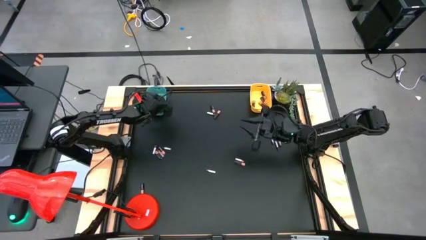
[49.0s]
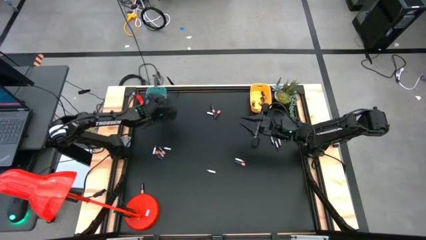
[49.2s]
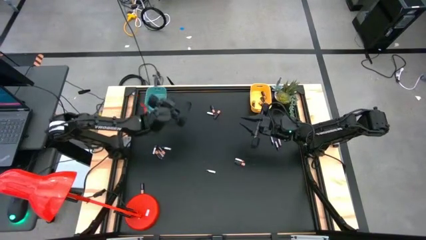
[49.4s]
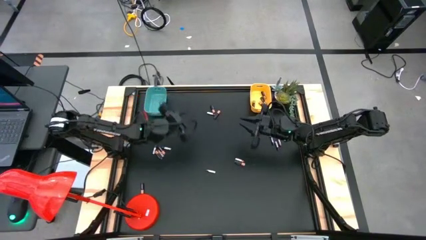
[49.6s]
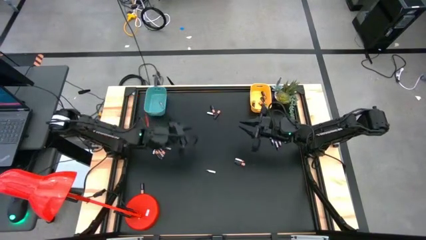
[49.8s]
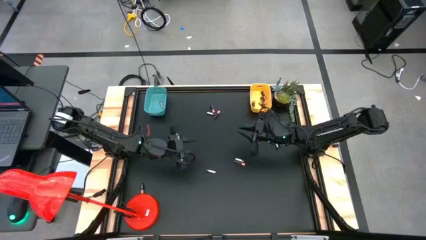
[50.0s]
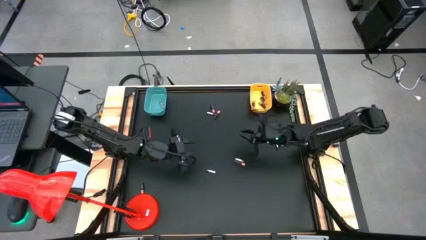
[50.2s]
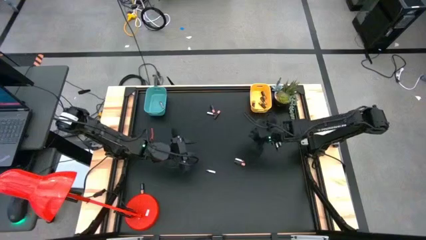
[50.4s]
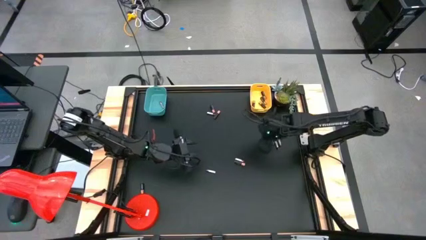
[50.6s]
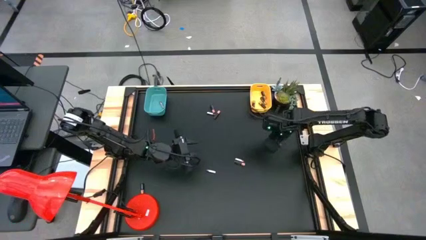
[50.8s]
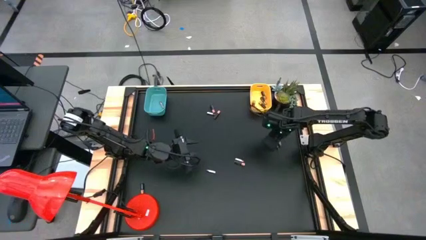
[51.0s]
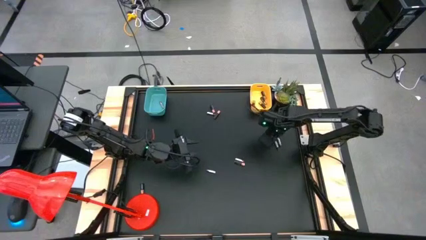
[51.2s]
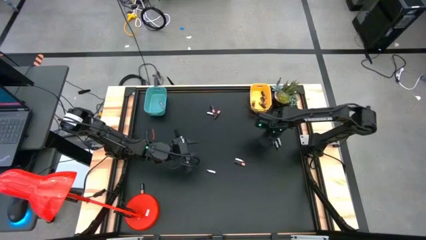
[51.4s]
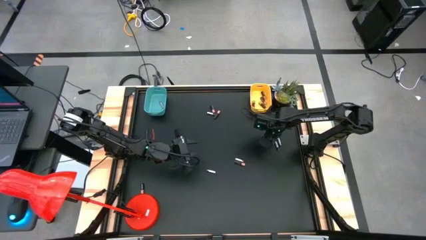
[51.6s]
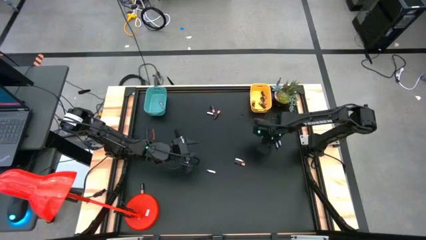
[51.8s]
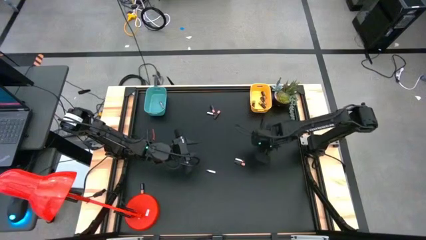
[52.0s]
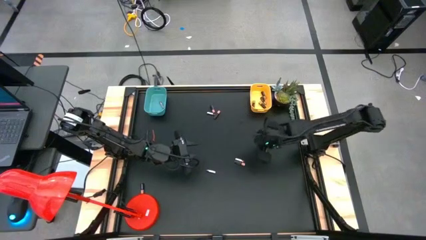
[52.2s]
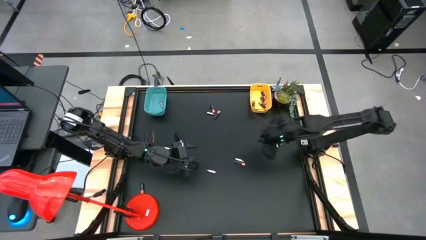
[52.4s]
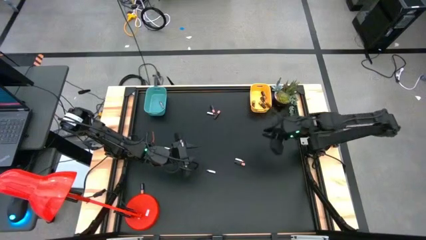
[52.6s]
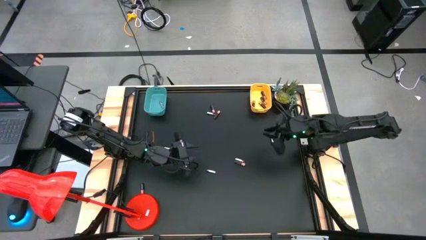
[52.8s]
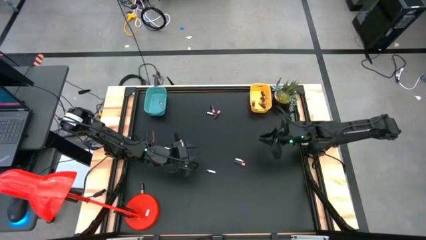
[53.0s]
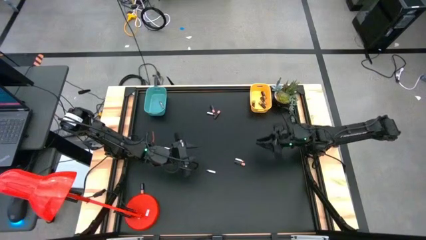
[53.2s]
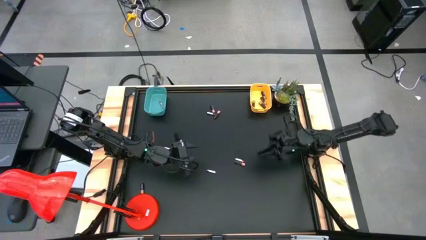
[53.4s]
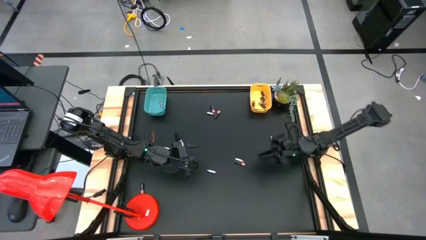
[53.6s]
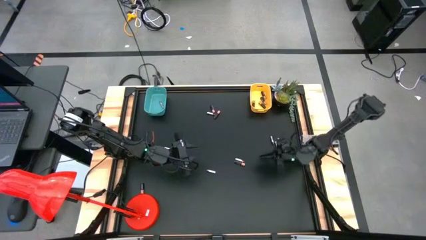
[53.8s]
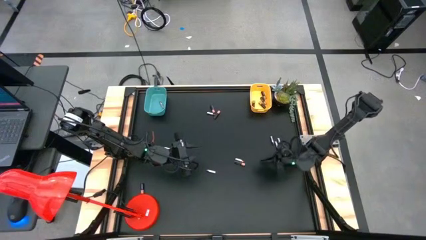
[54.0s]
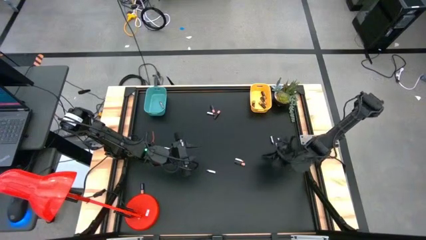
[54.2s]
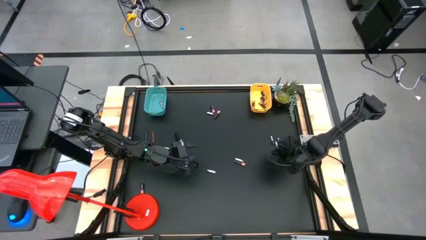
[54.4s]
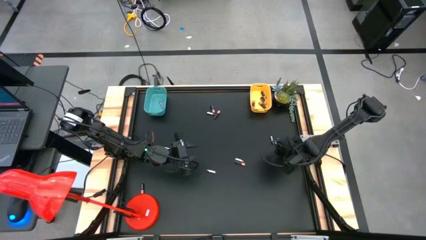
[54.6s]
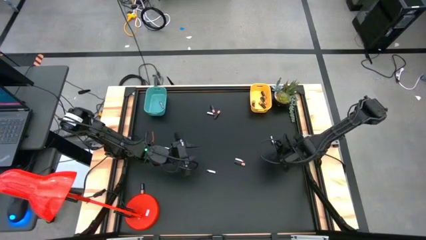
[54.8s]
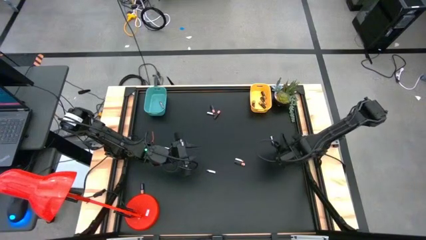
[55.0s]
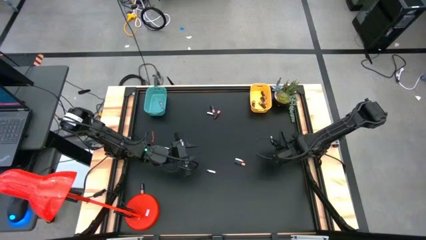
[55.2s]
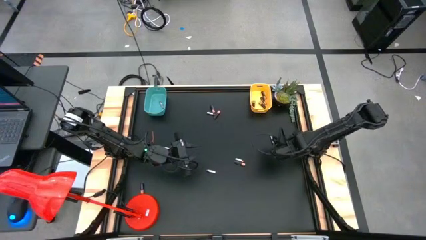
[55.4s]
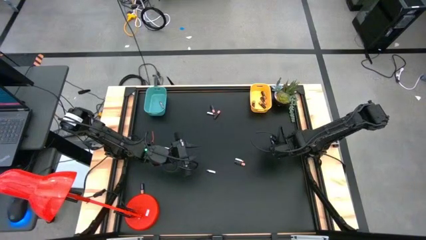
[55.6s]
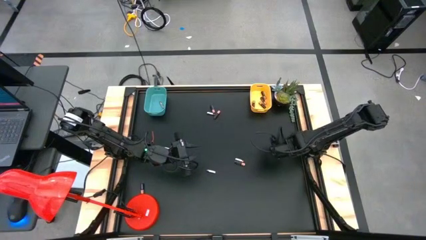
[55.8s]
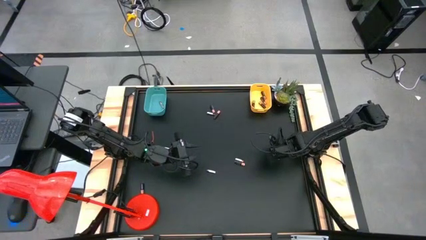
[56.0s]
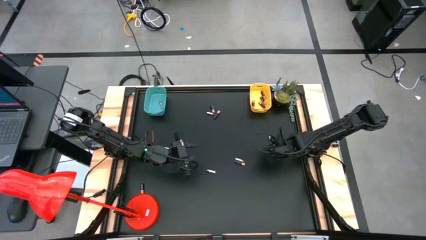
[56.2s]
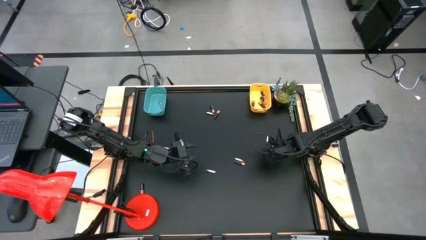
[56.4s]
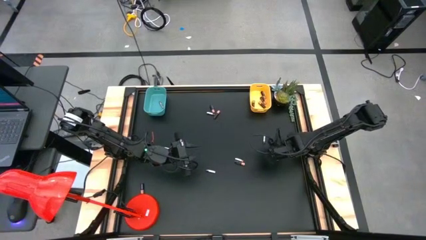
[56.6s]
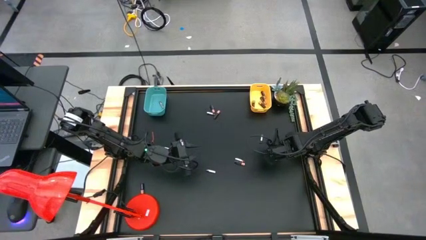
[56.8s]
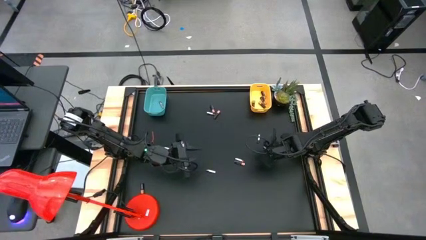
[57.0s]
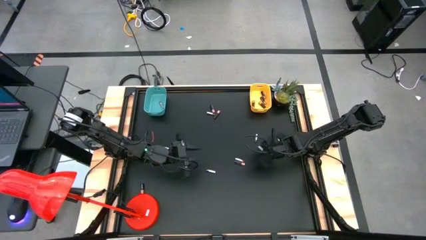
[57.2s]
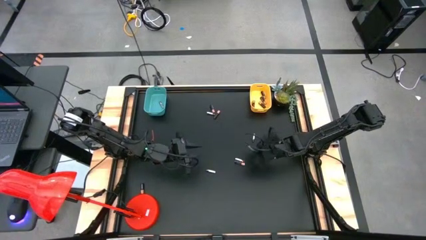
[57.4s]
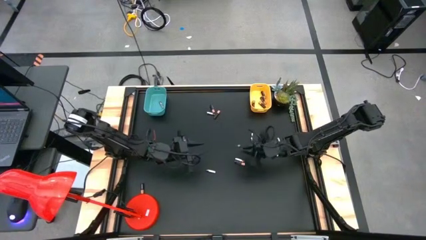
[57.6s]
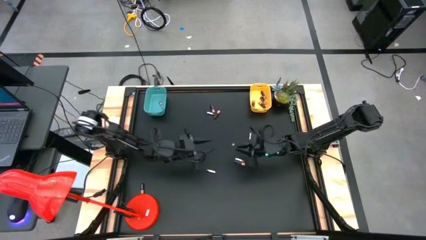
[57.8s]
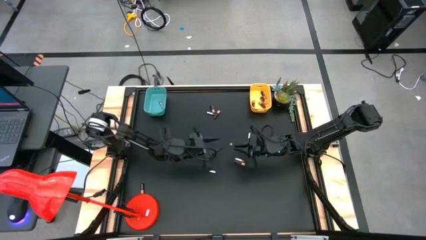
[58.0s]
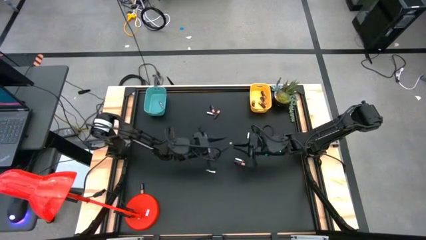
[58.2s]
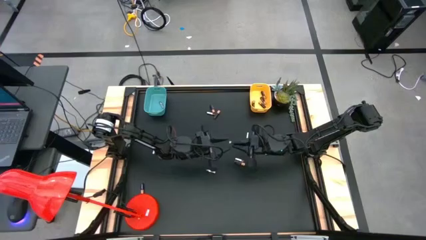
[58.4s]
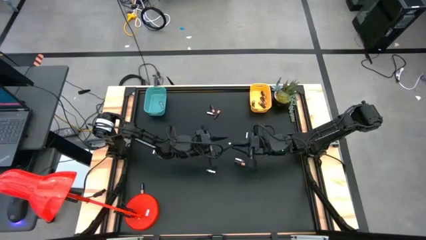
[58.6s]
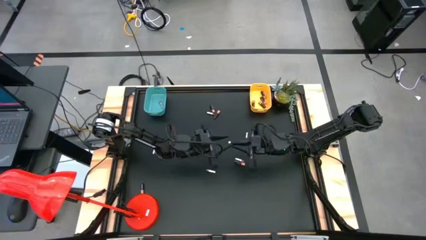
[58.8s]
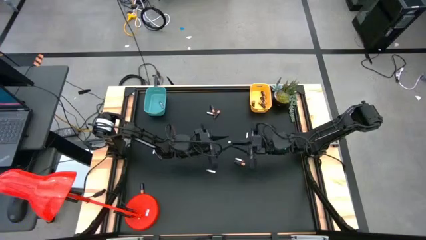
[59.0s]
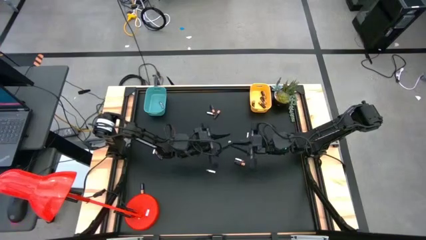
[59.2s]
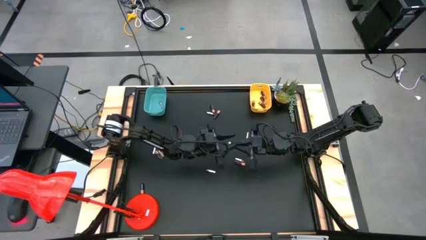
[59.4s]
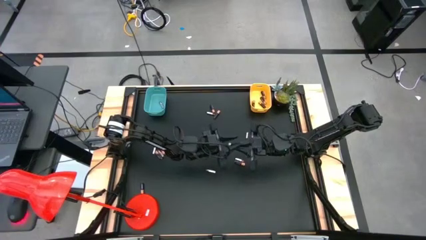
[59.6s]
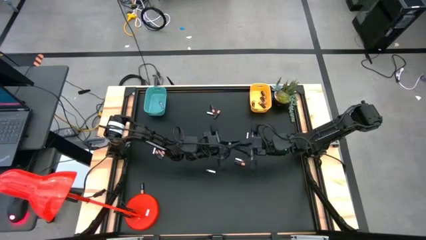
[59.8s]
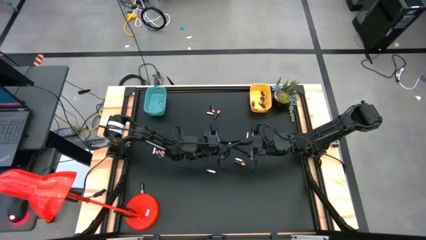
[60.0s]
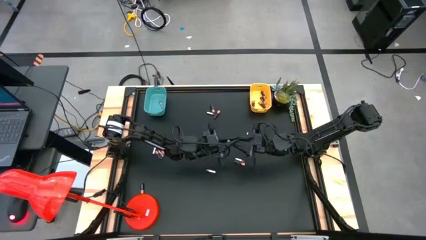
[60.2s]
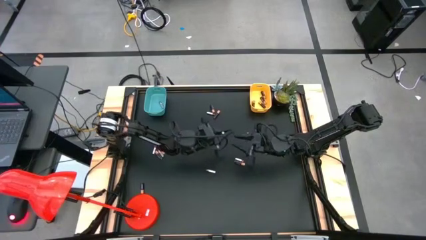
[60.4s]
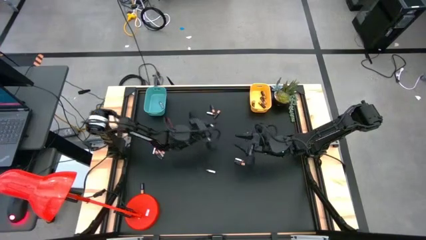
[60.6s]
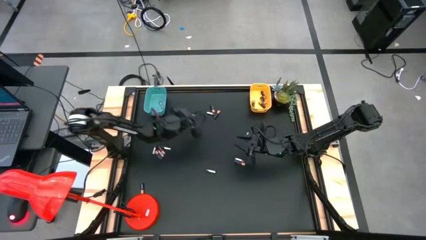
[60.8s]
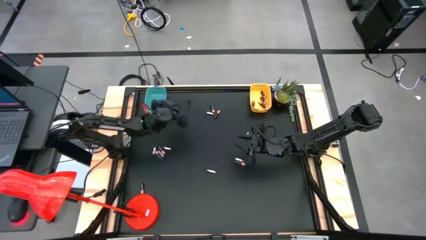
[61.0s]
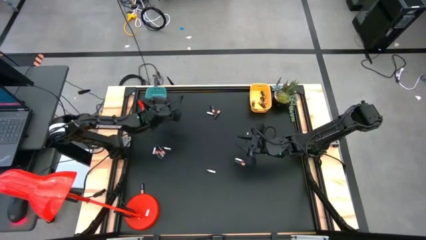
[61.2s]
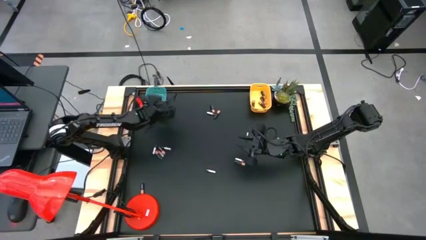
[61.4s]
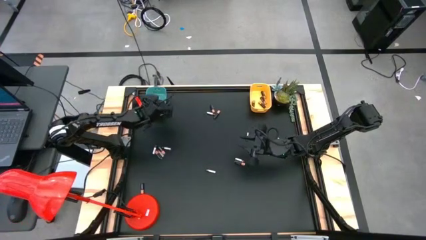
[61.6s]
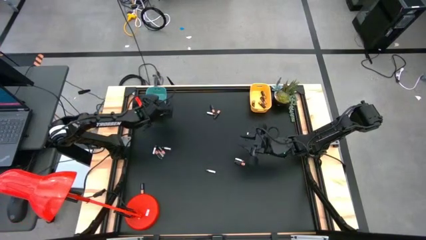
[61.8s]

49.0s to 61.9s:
Task: Sort batteries
Put the silver battery into the blue bin

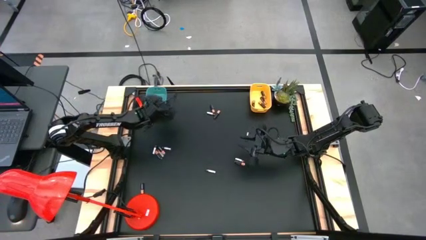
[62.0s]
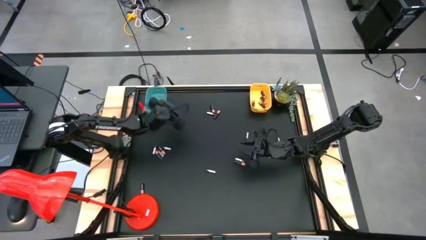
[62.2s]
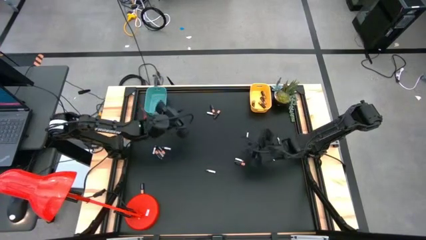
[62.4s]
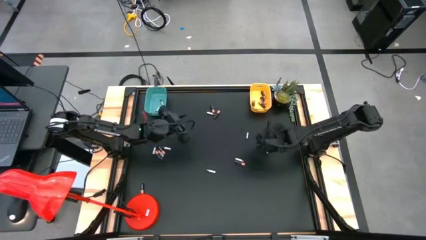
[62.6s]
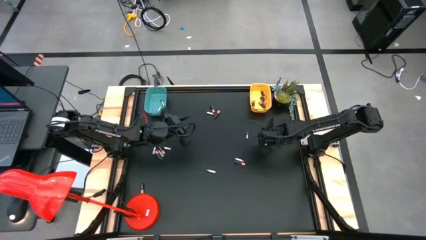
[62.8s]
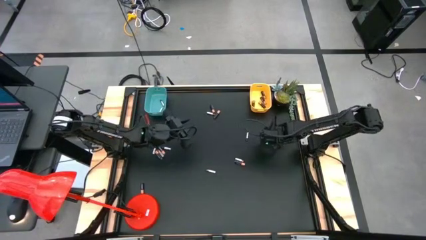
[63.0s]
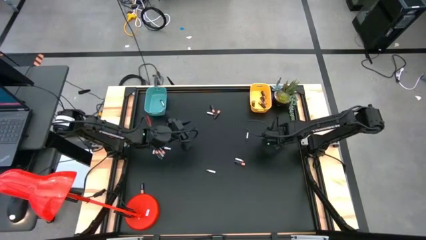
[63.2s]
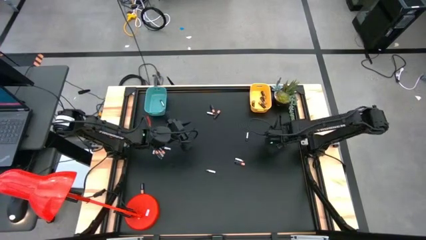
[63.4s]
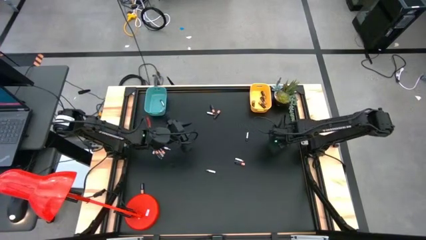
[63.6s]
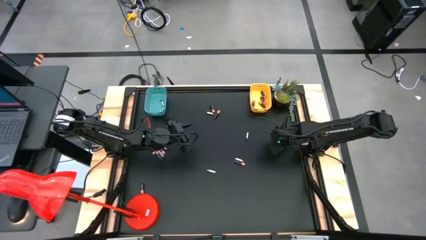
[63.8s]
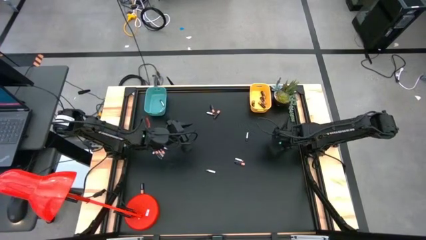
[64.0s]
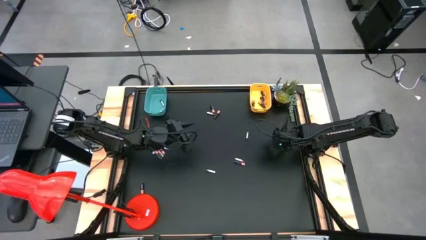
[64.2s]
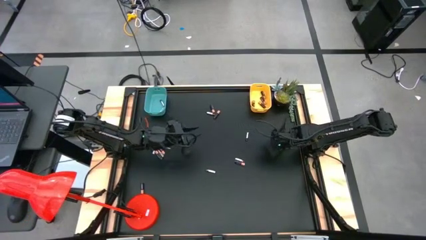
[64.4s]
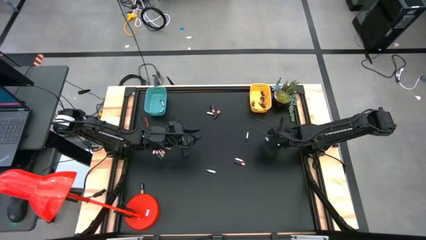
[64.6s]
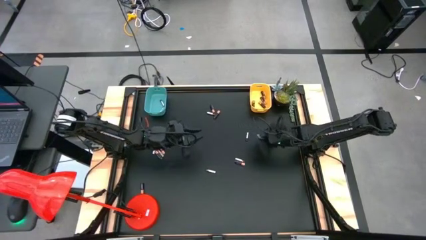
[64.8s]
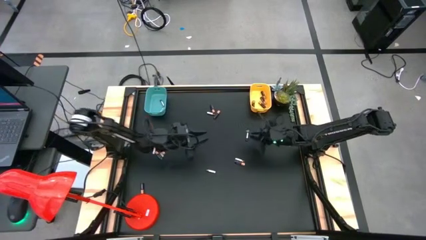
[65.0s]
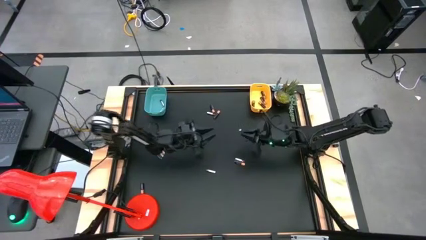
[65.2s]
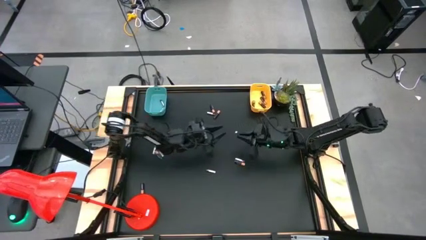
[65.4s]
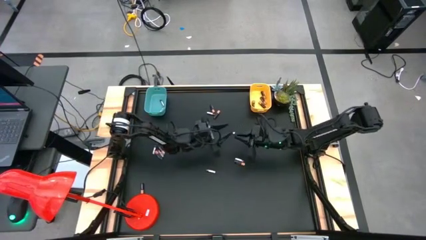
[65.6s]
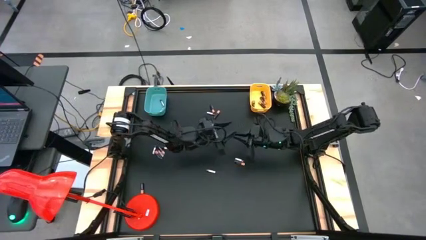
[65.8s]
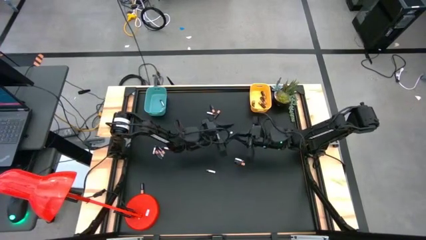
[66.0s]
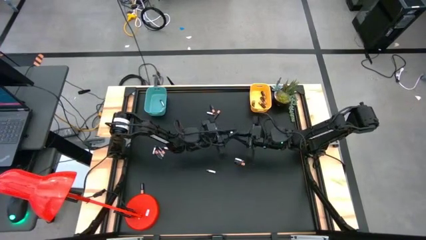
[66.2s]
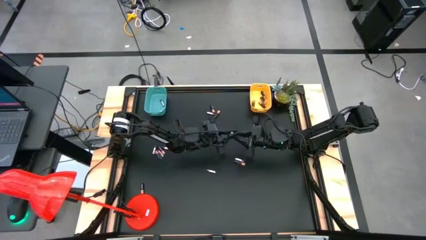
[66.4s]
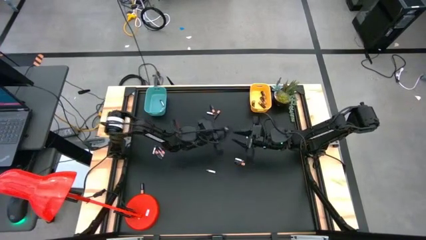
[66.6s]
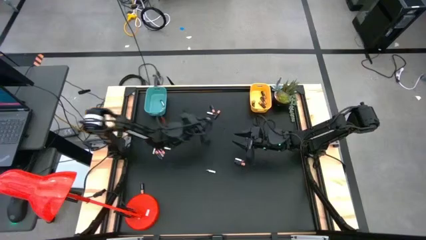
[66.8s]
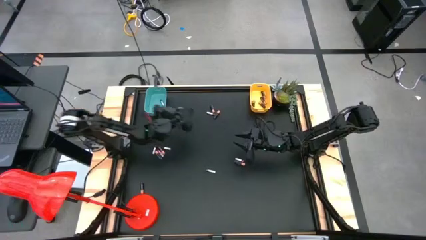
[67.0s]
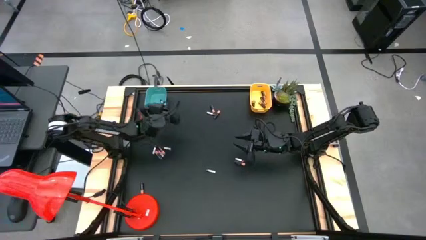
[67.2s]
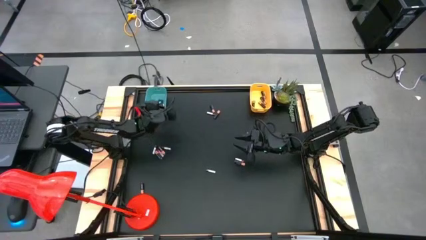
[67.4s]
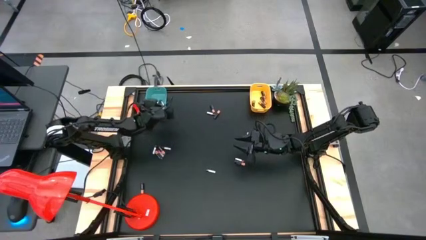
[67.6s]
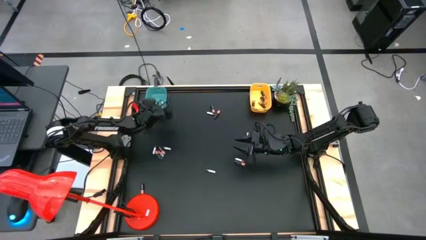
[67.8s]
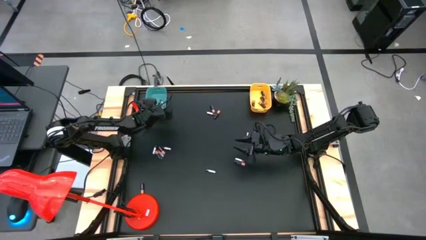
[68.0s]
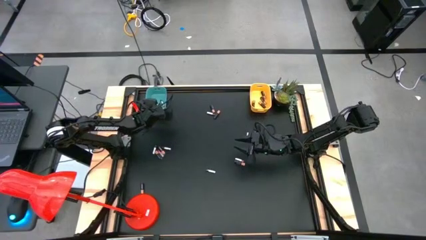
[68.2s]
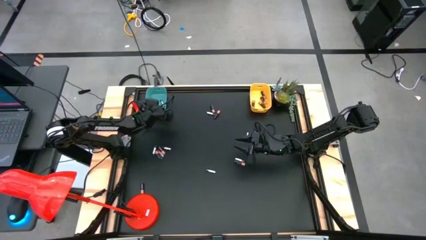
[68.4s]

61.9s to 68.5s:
Put the silver battery into the blue bin
